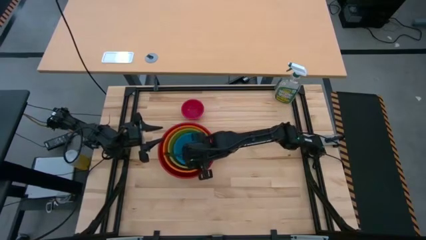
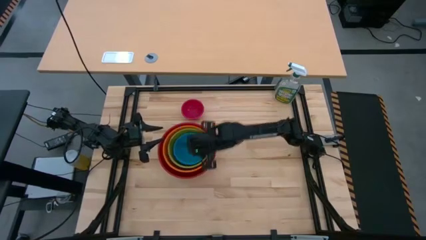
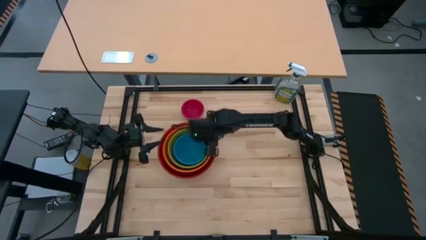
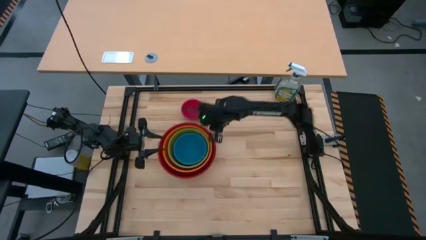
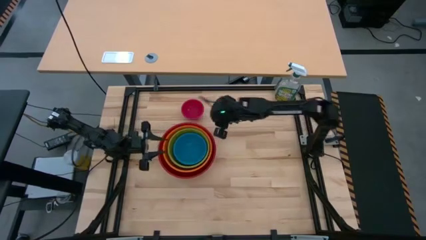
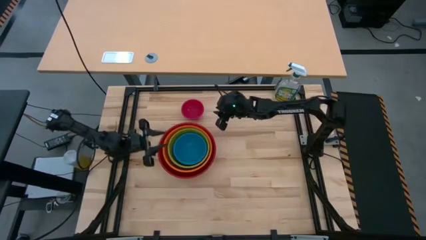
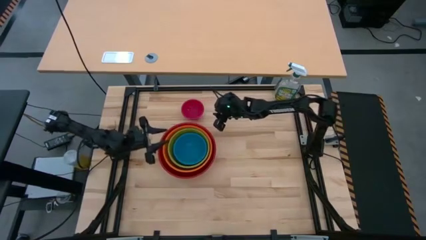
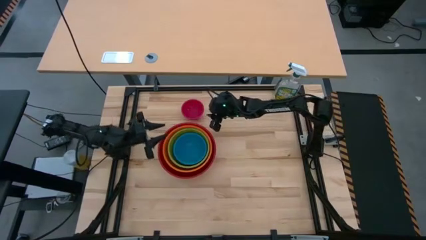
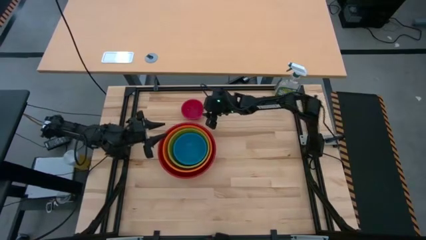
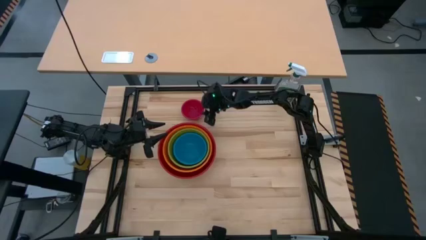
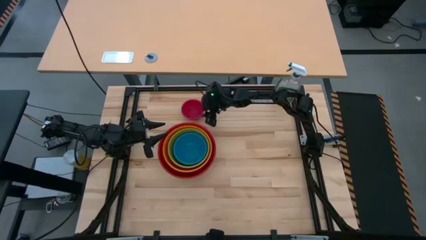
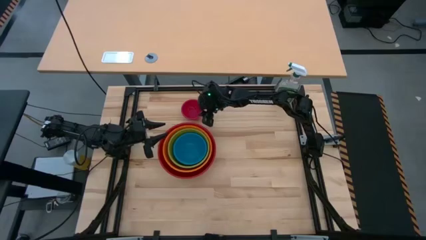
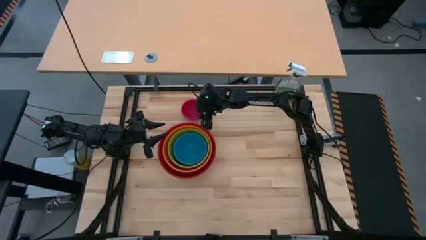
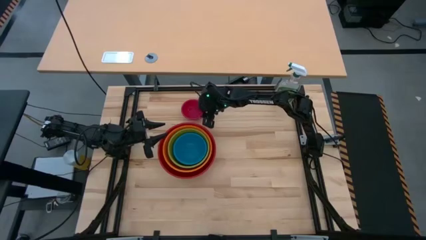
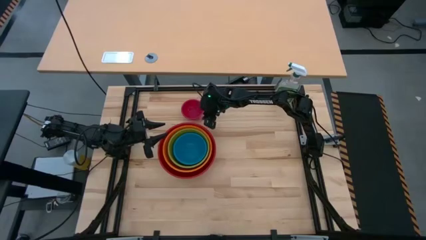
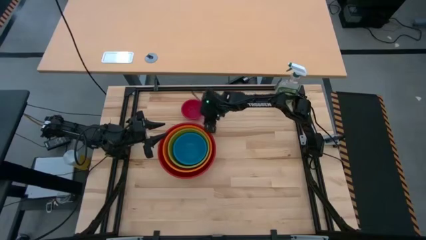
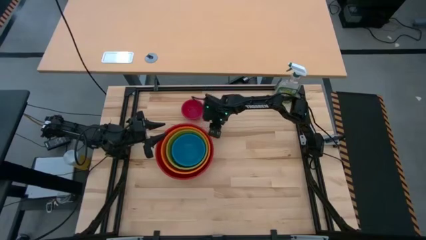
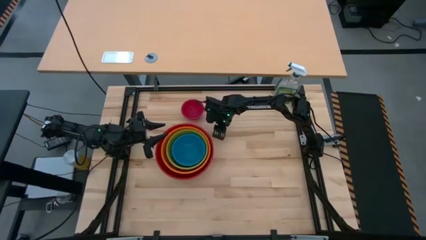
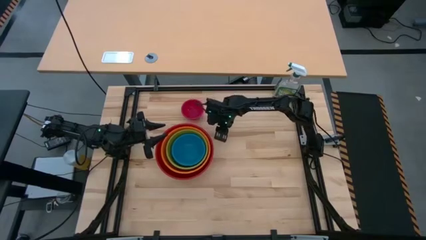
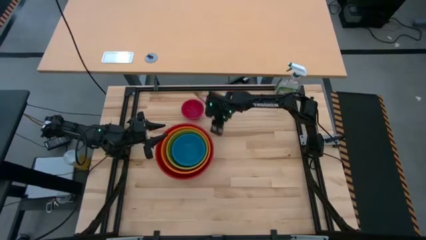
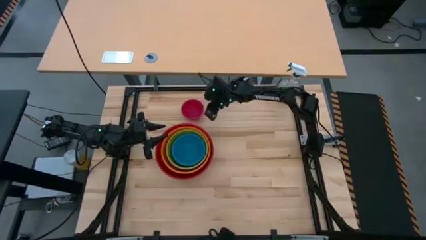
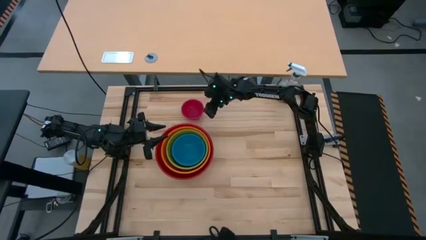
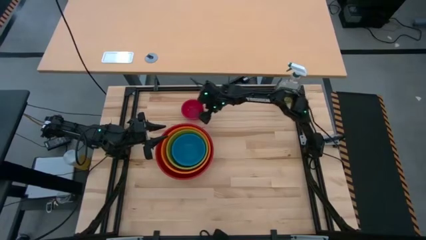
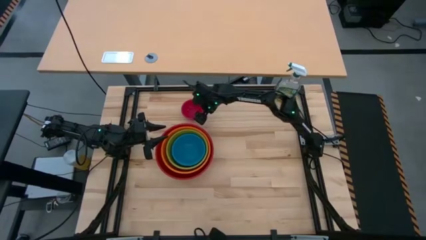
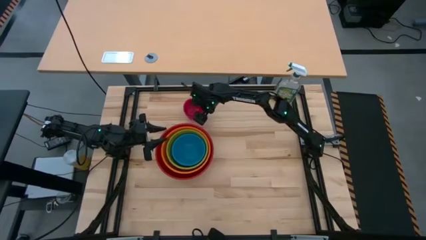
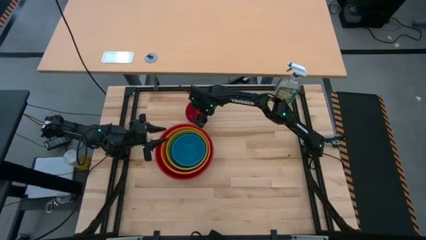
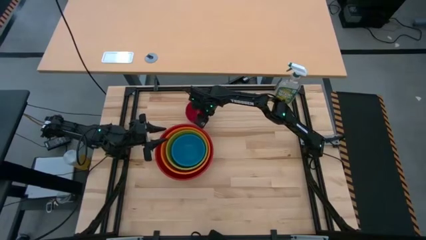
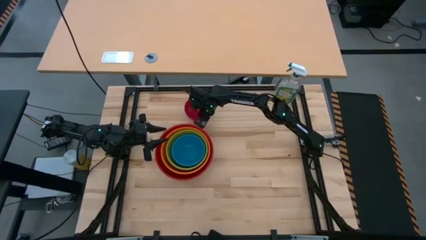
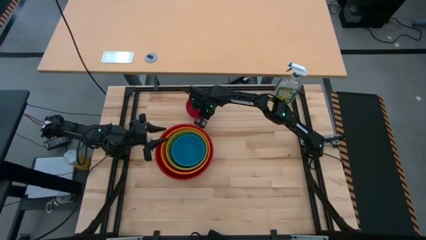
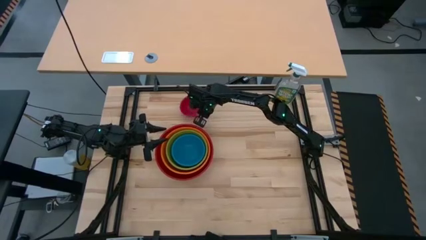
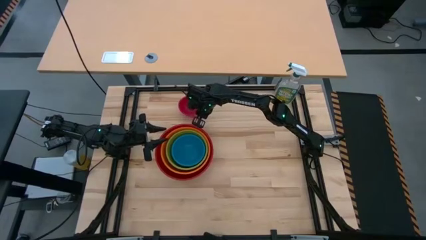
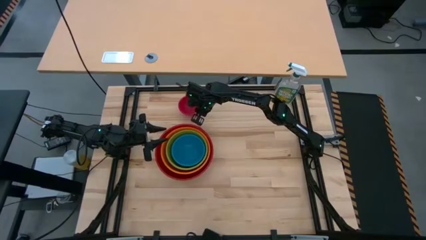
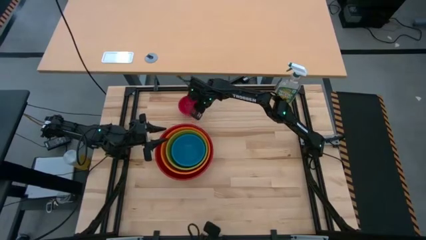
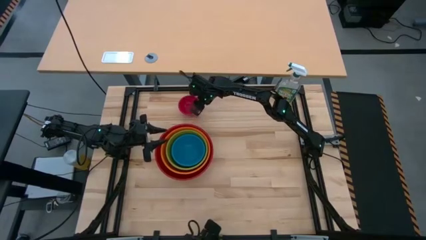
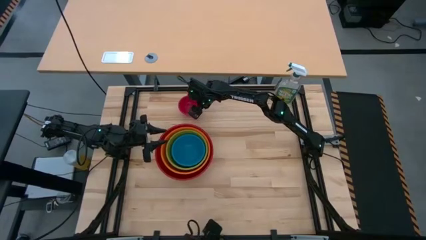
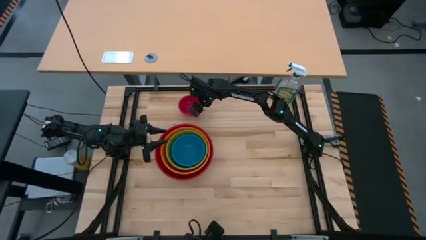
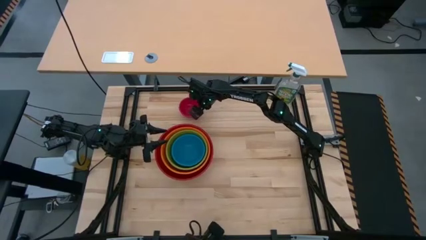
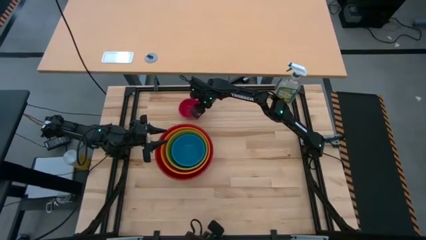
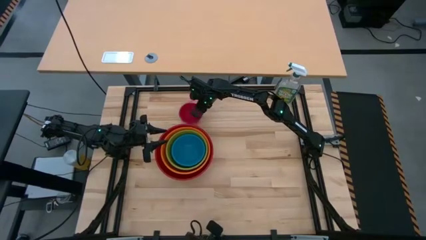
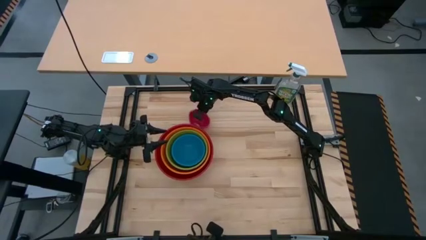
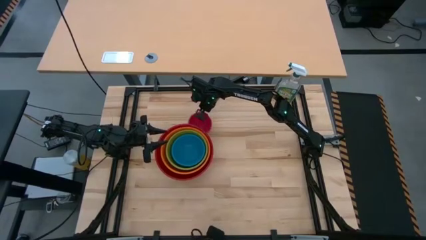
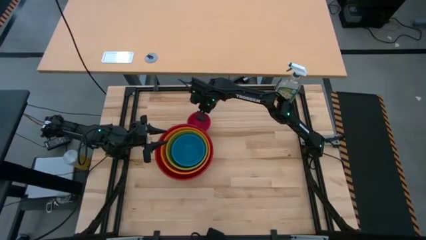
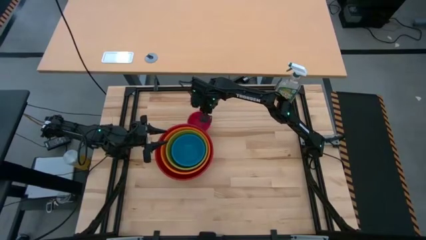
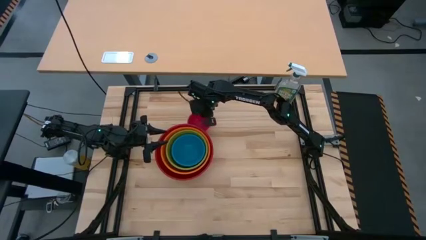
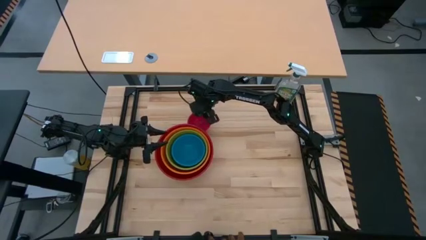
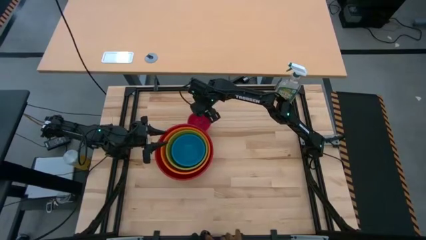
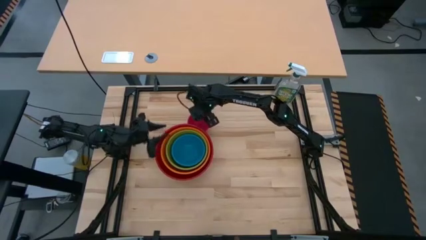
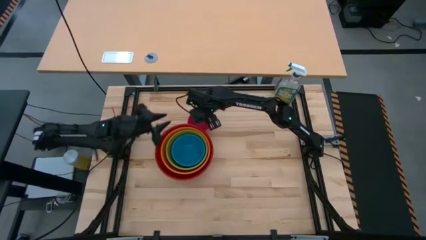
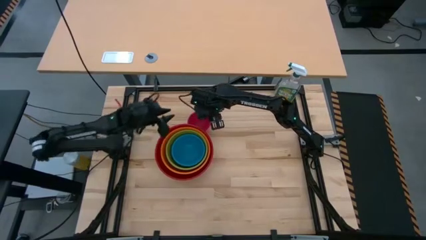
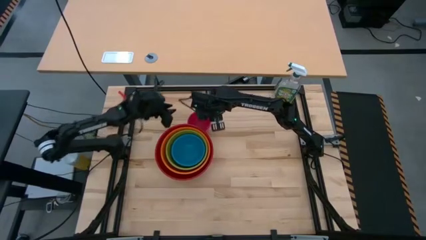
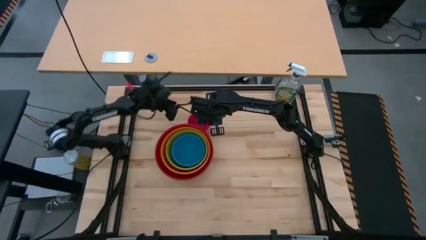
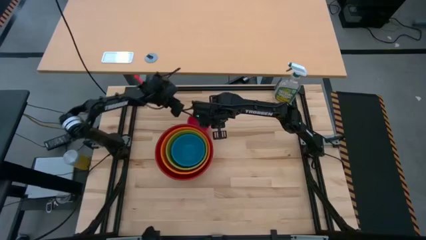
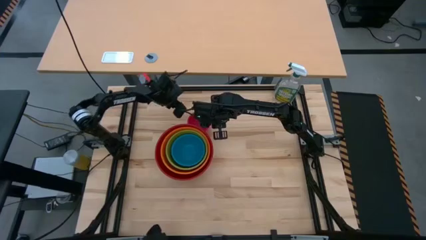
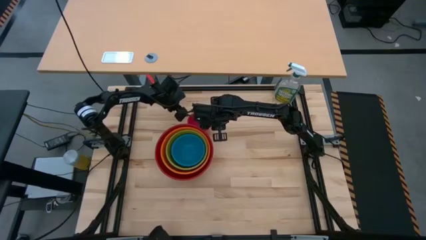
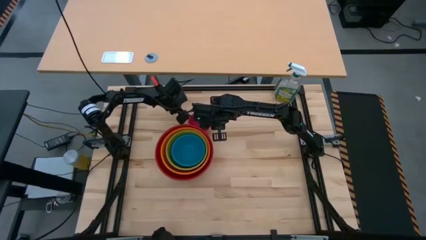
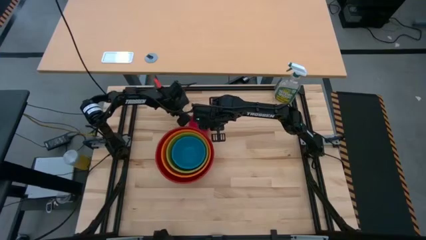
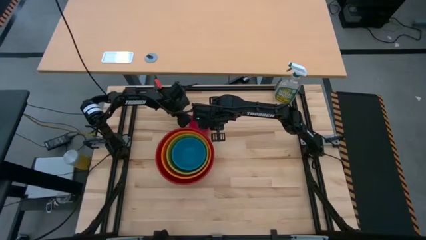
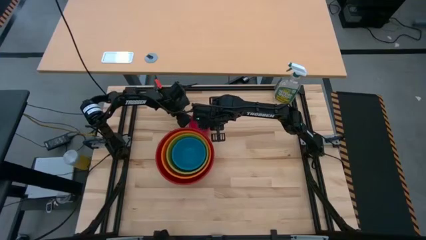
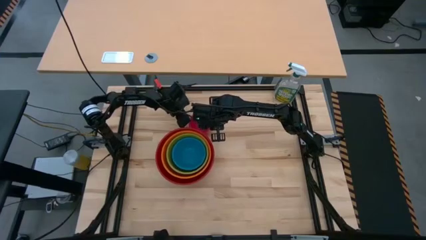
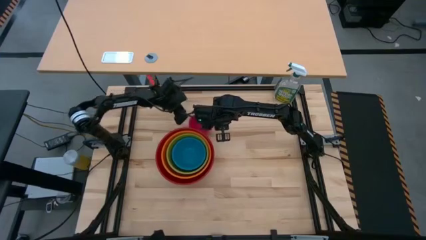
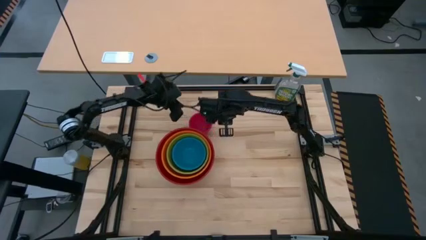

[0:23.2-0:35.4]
Stack the light red bowl on top of the blue bowl

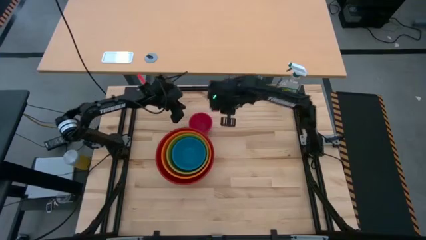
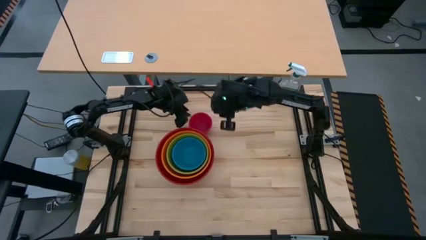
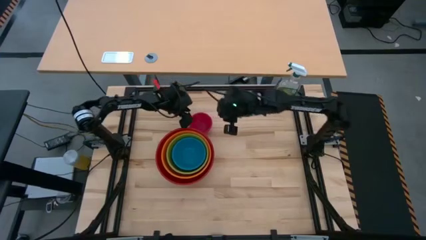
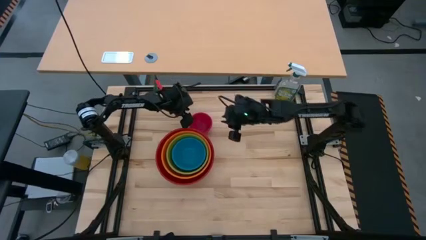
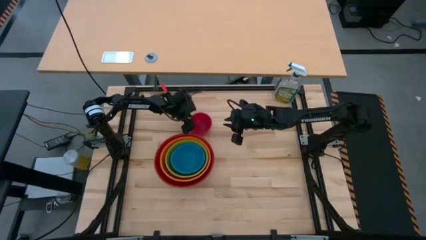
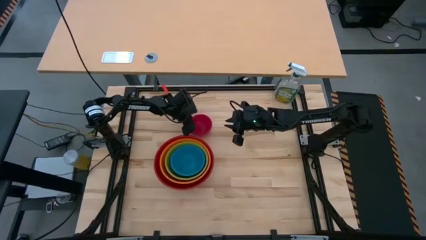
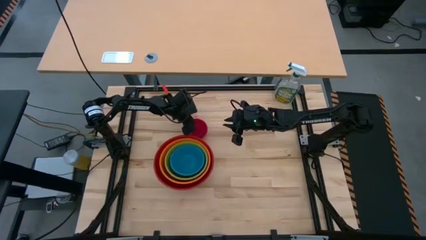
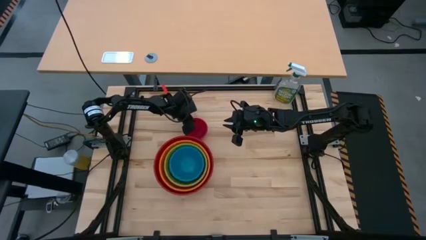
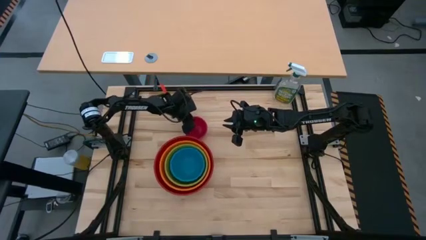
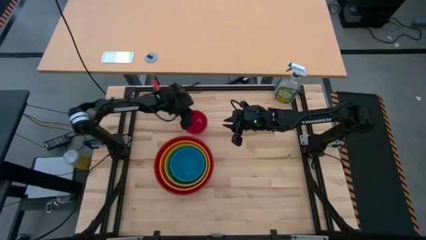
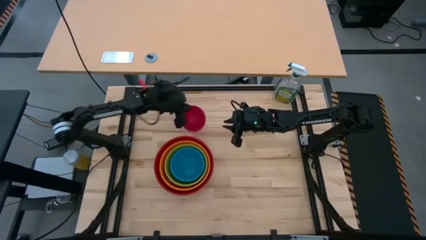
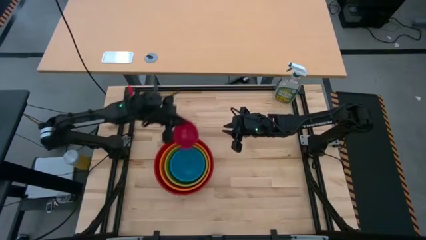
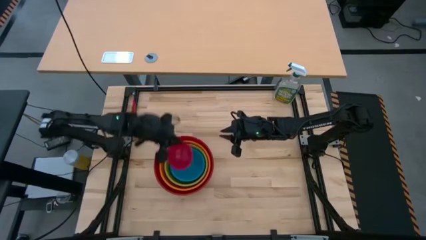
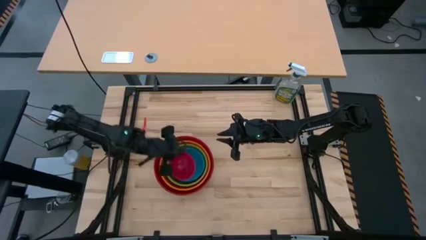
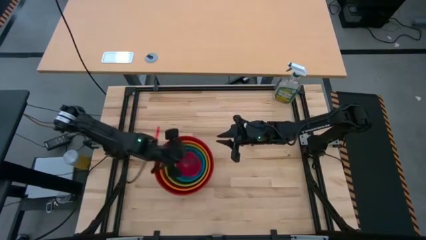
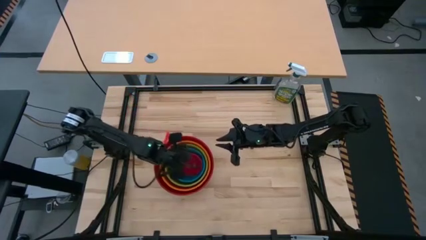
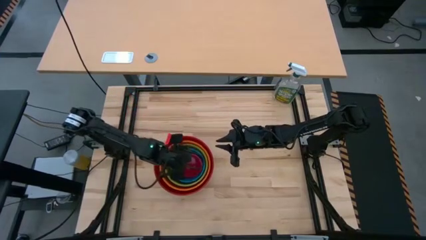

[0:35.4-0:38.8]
Stack the light red bowl on top of the blue bowl
